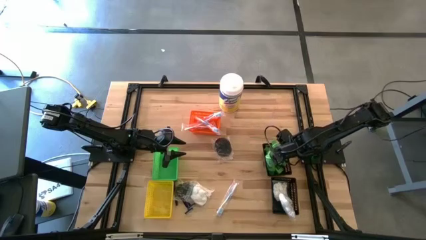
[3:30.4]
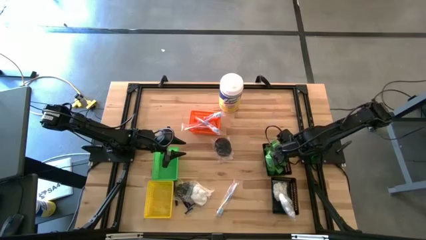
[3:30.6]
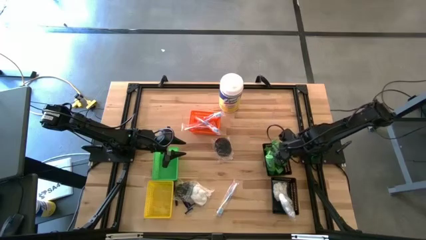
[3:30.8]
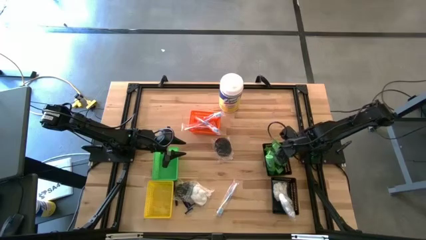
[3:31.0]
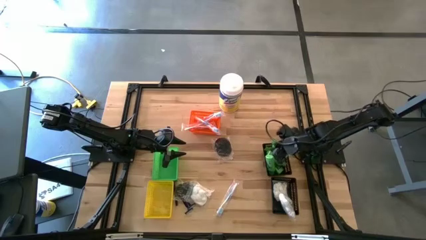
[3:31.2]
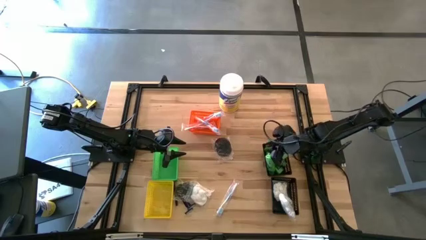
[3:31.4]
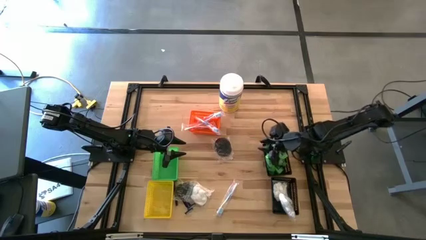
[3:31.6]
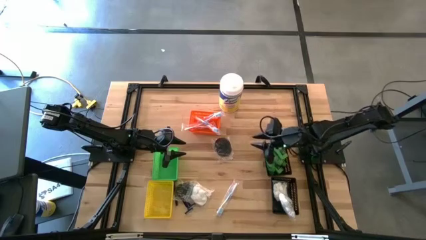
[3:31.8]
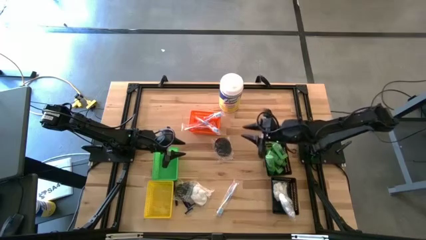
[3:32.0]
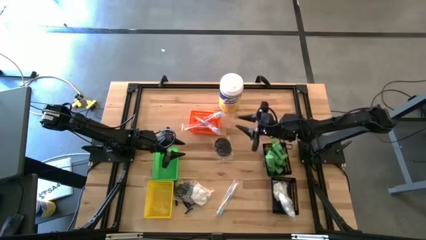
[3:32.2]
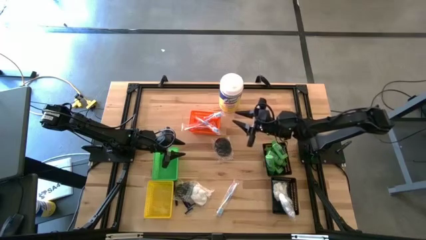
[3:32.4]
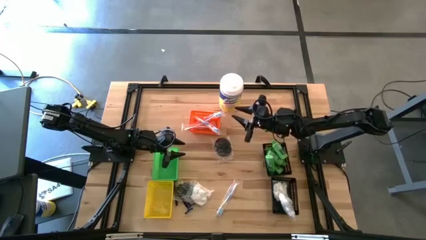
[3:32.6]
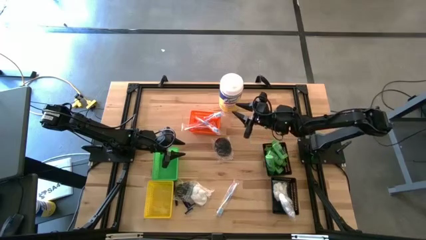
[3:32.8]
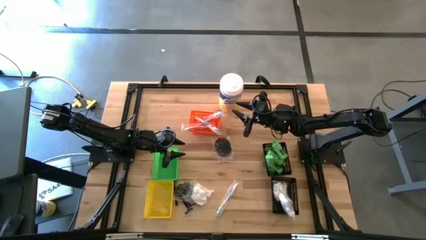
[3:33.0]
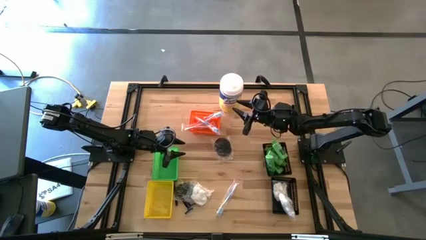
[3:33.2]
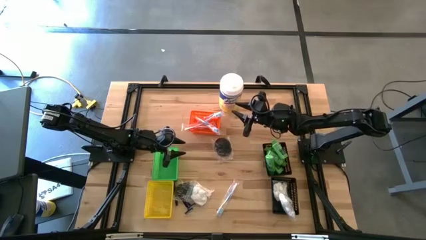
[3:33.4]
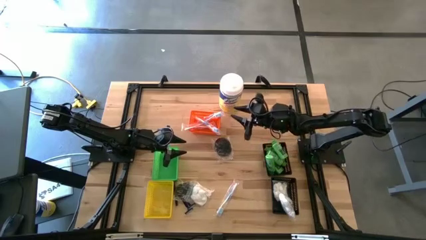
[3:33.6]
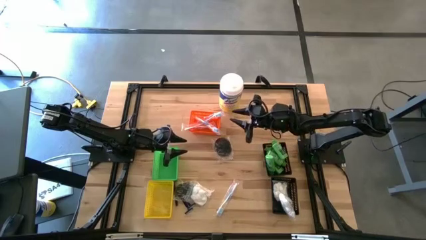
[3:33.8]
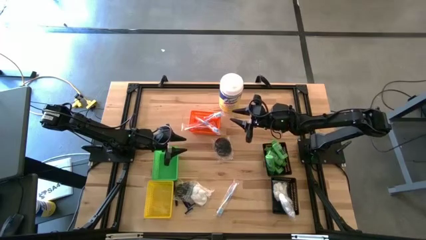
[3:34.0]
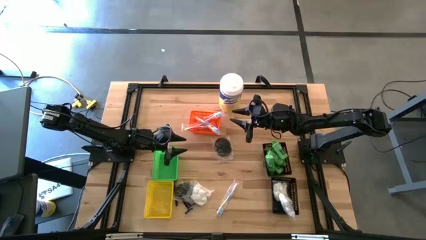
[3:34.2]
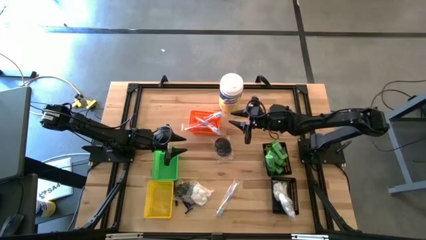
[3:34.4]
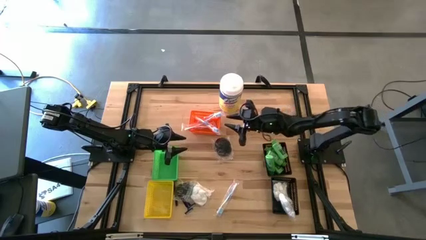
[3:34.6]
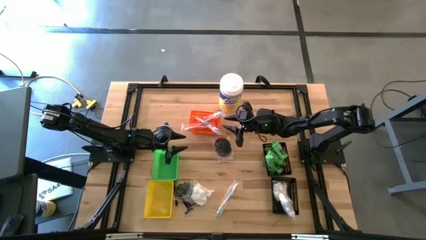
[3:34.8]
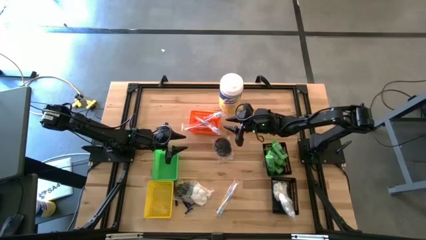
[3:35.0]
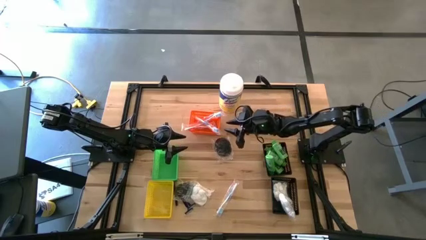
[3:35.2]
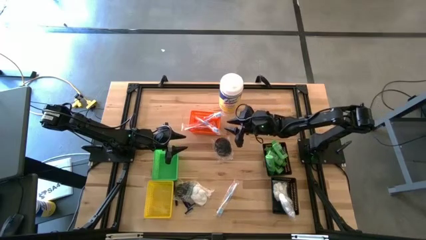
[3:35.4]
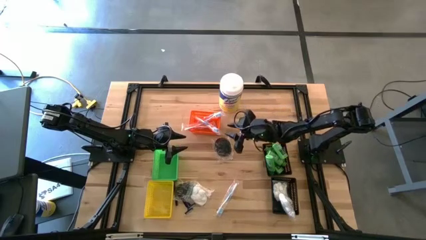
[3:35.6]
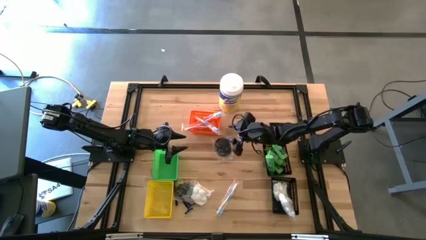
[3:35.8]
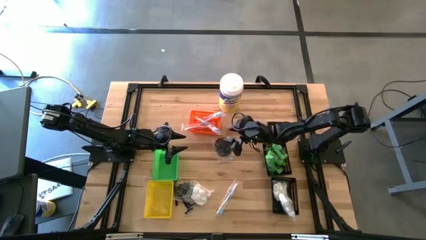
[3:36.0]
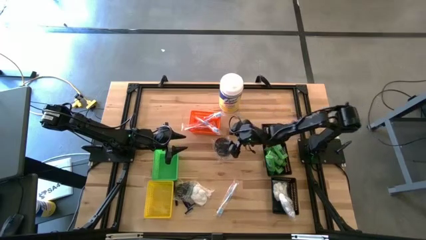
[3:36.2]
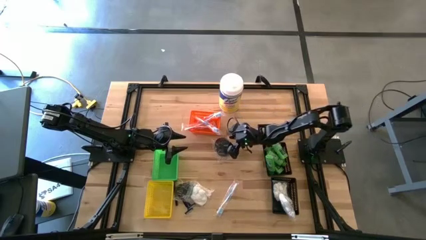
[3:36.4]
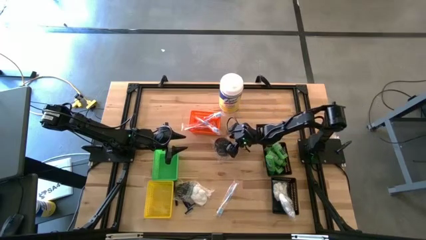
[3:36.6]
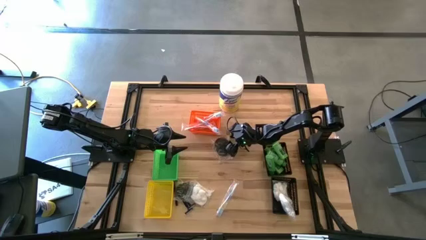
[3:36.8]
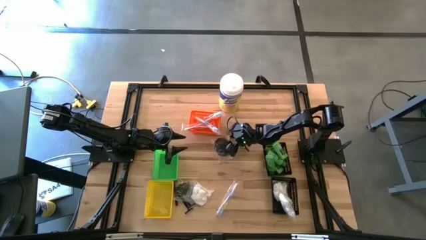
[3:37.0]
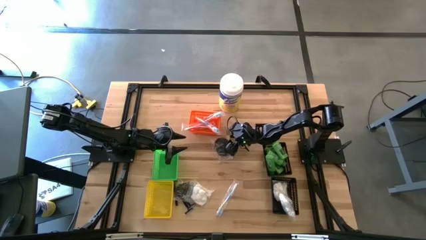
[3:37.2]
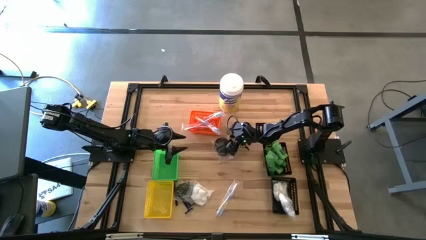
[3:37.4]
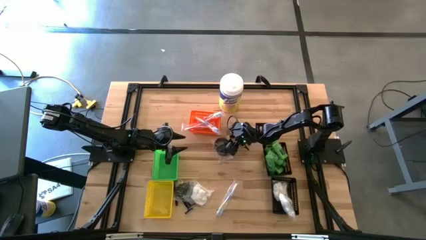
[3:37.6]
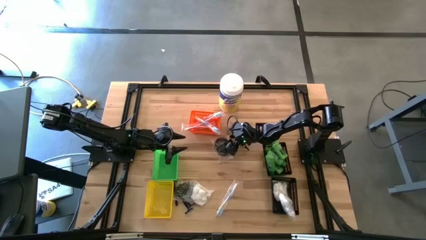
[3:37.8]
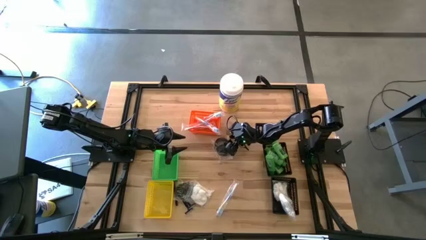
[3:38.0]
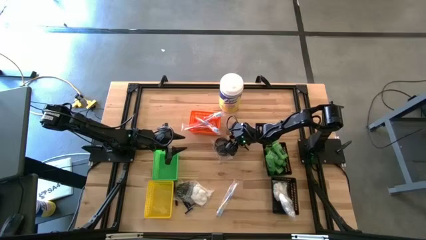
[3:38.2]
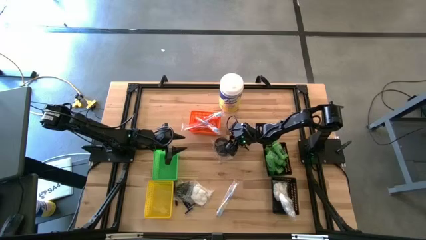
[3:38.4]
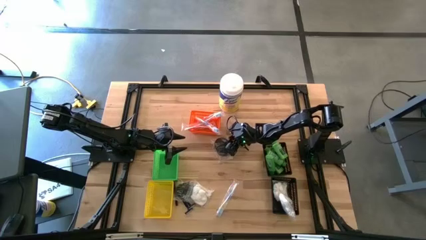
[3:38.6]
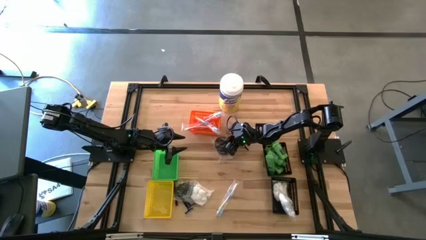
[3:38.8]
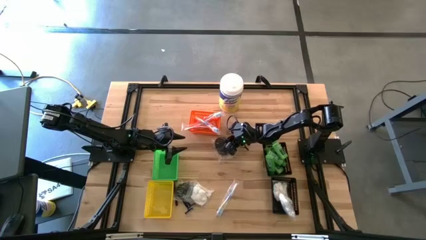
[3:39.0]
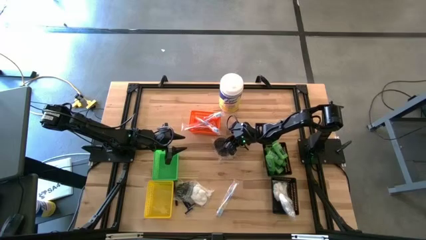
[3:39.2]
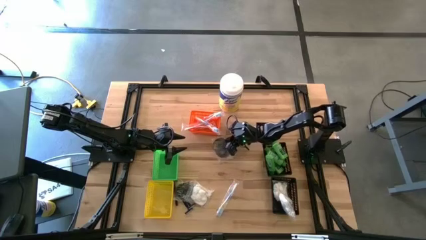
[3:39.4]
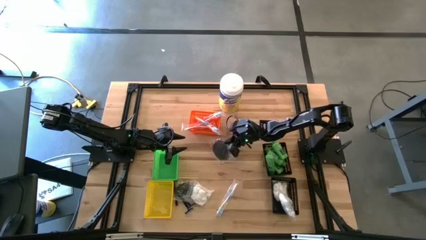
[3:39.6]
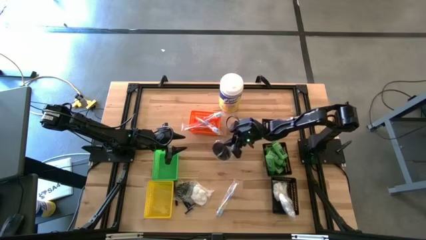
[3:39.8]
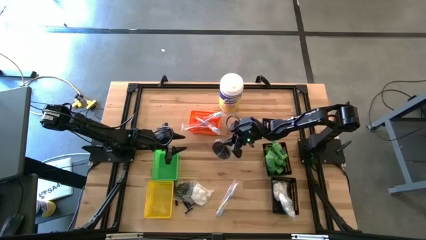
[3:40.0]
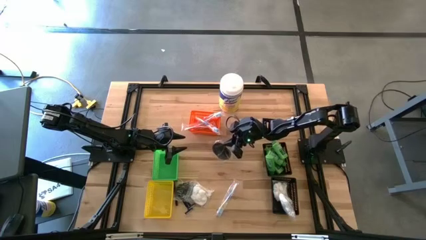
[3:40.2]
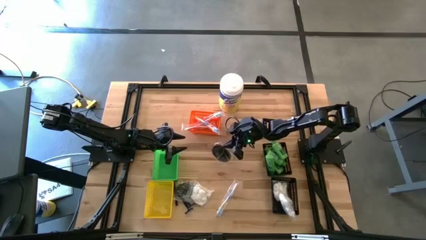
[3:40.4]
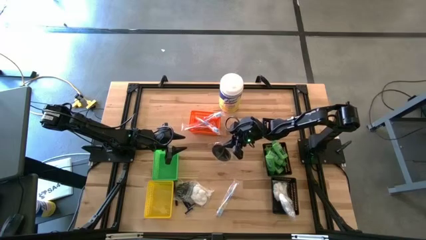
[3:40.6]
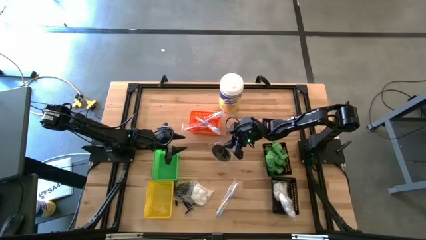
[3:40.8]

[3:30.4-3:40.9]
Task: Pick & Place Travel size toiletries
Put the black hairbrush into the green bin

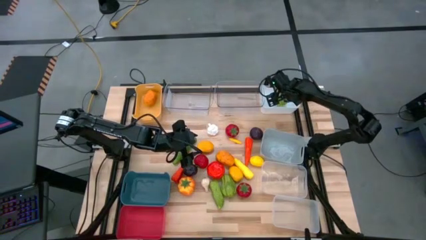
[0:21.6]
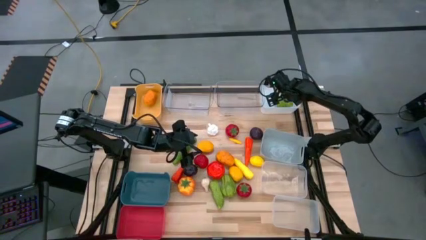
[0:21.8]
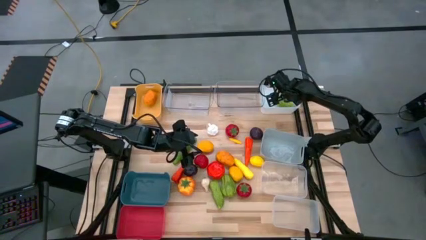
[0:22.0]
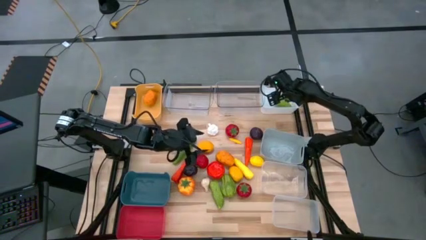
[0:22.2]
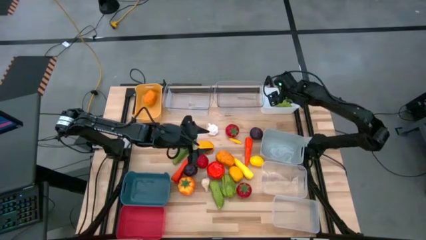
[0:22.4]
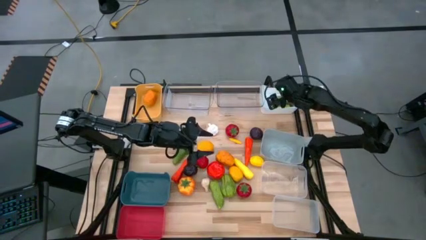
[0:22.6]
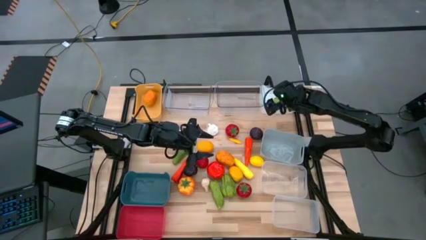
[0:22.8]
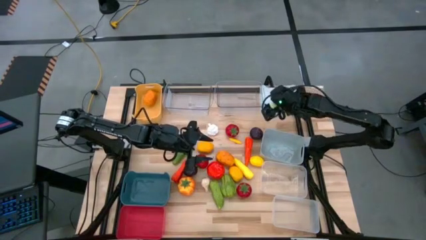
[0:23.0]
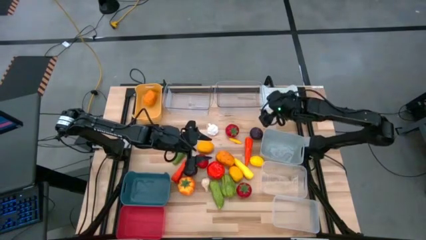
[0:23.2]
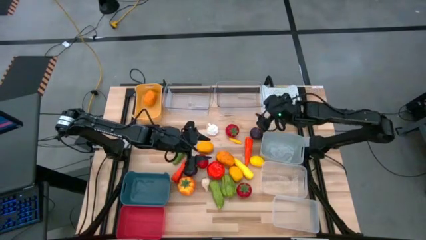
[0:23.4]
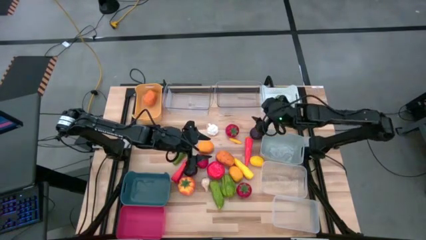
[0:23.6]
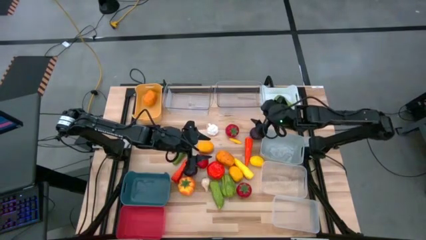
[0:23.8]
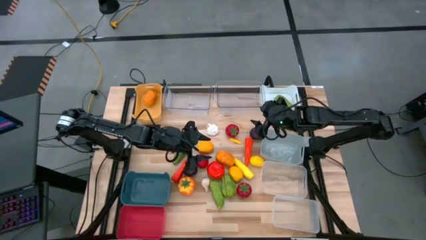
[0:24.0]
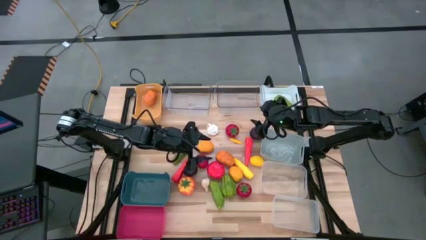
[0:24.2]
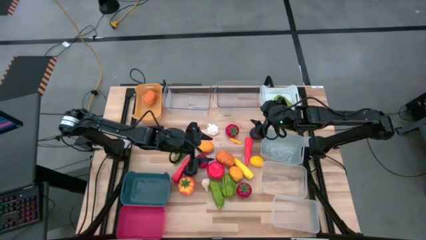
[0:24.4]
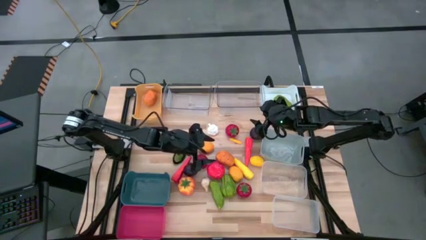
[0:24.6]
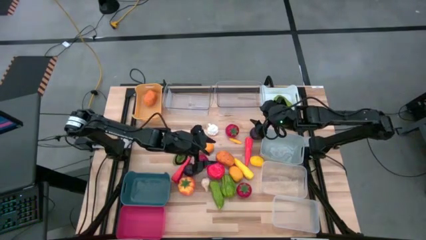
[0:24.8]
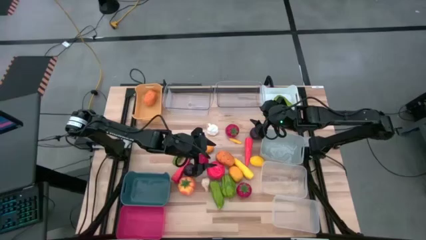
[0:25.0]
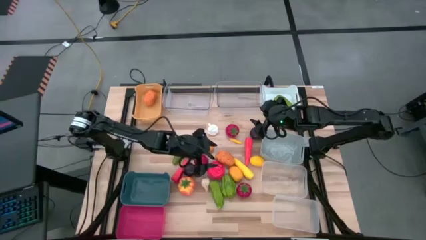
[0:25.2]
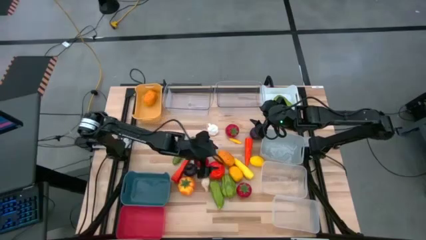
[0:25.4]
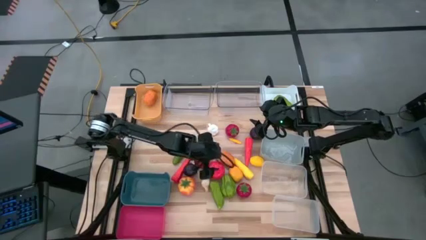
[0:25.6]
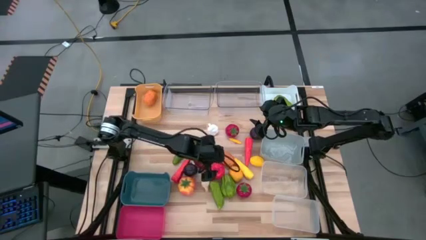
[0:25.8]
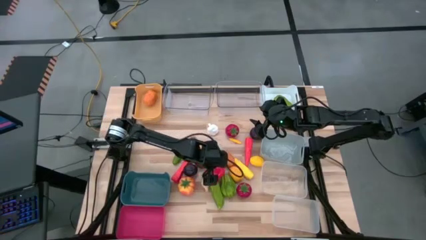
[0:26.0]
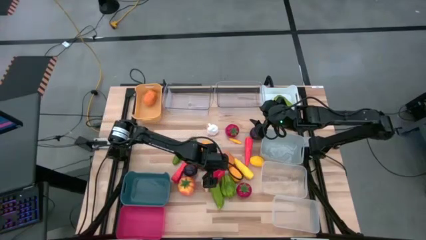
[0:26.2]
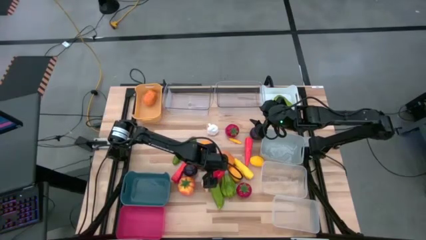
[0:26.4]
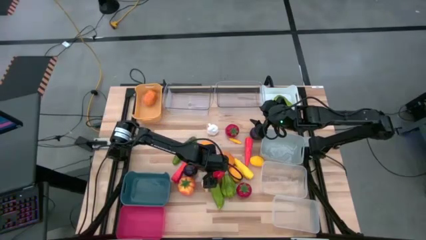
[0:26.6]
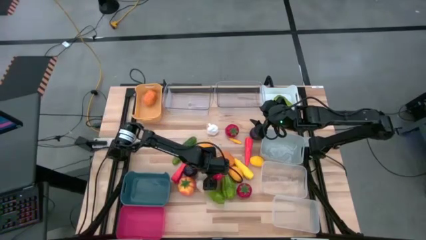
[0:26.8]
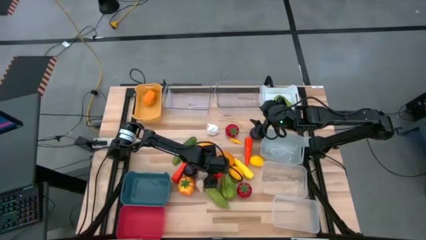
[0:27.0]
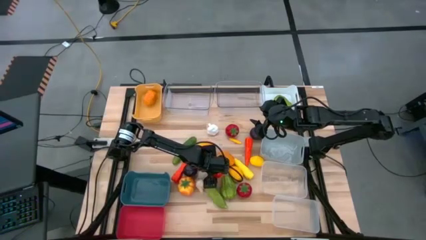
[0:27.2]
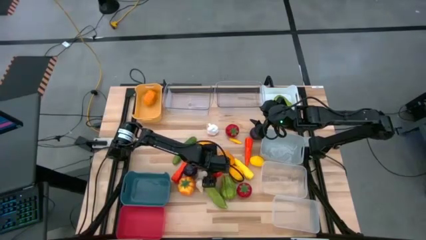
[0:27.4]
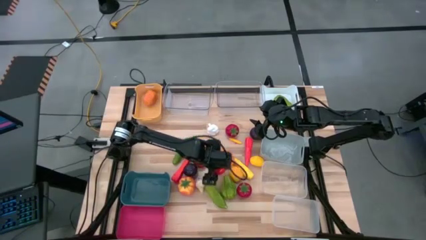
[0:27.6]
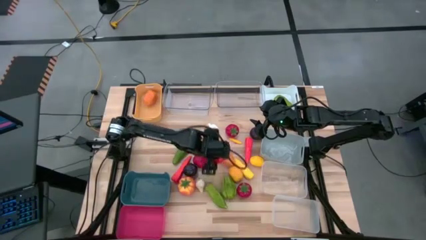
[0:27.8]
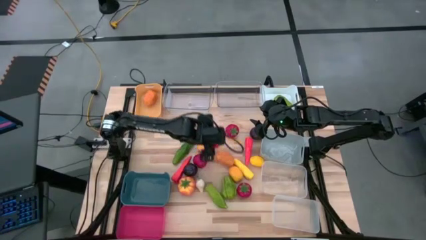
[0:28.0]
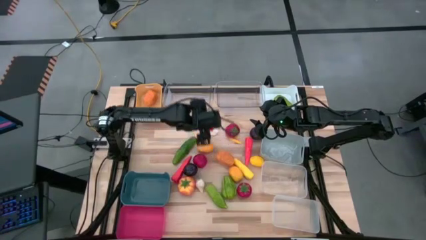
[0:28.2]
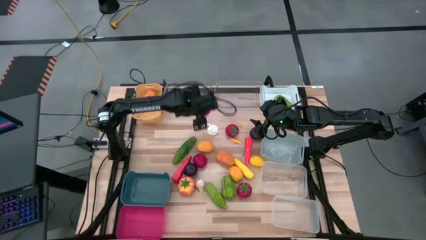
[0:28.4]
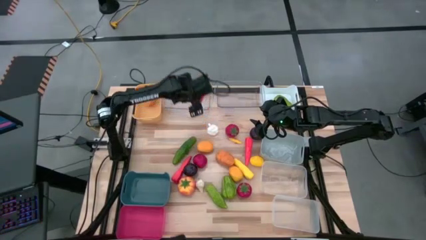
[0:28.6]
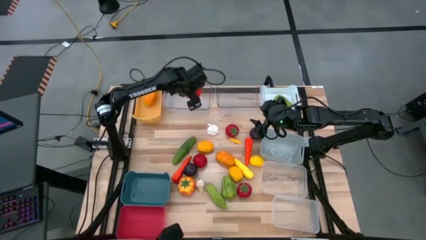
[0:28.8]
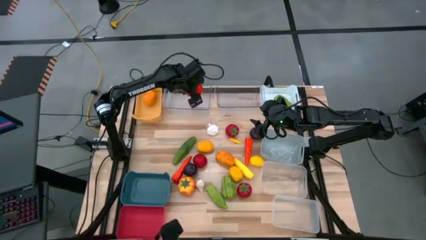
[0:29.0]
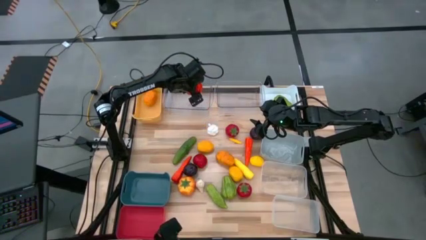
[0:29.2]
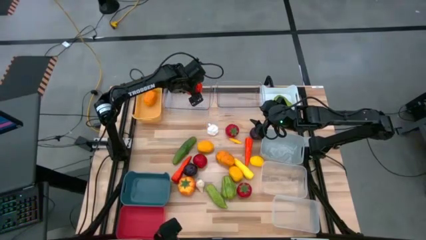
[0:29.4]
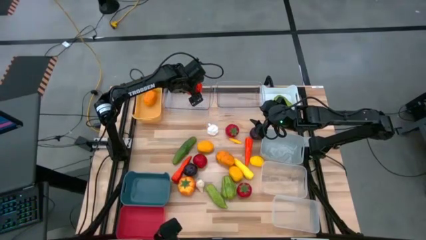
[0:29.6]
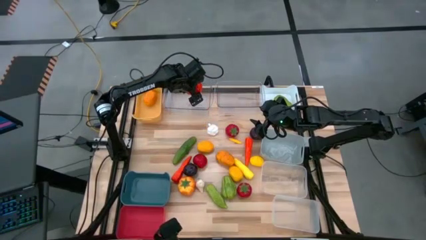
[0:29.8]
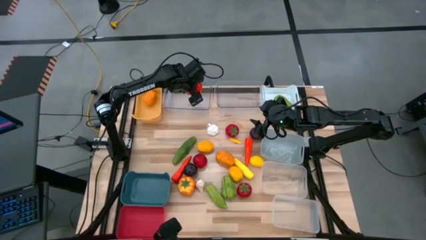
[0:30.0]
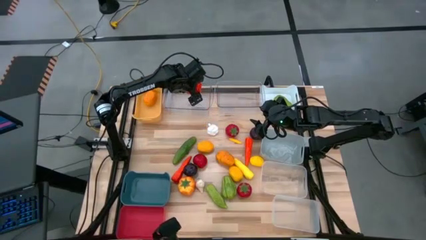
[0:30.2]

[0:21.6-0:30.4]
Task: Sort produce into baskets
Put the red tomato into the left transparent bin
